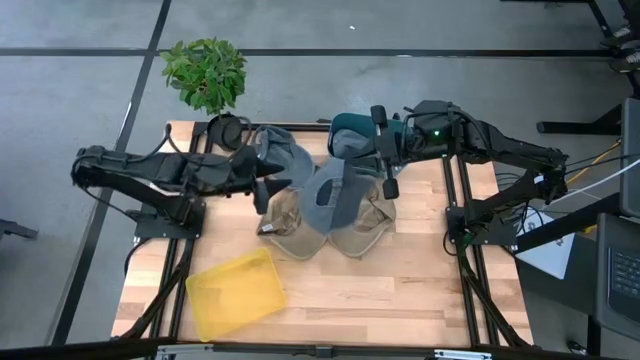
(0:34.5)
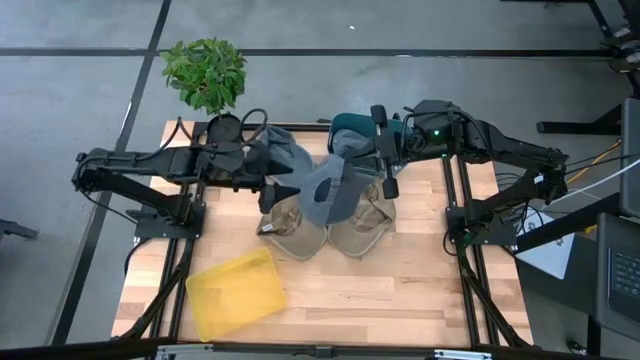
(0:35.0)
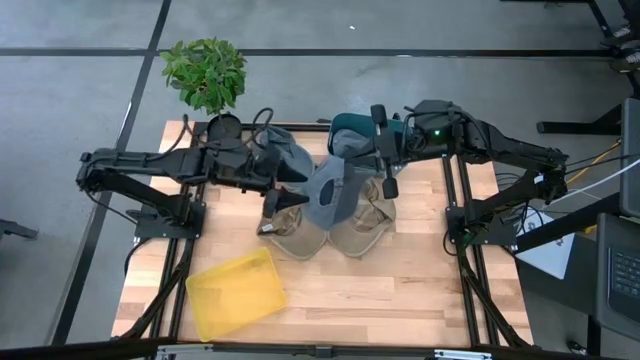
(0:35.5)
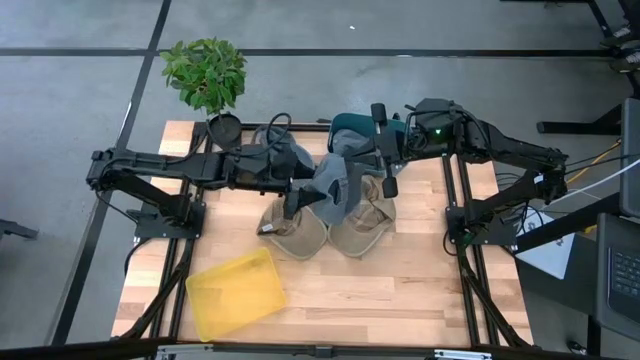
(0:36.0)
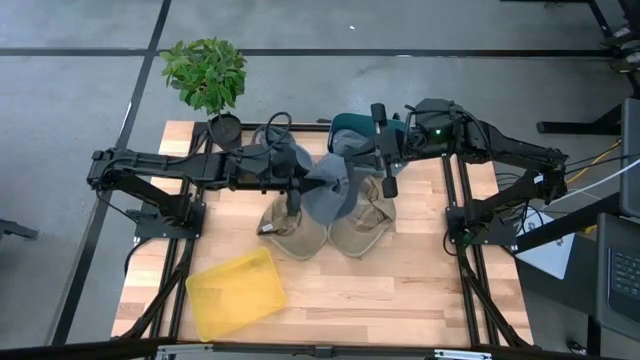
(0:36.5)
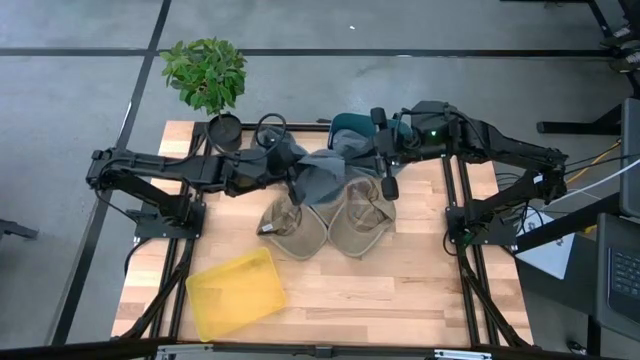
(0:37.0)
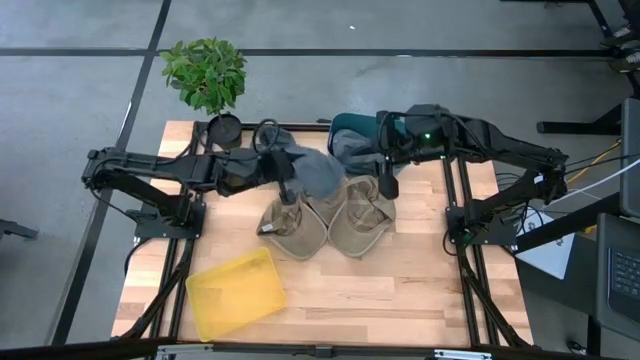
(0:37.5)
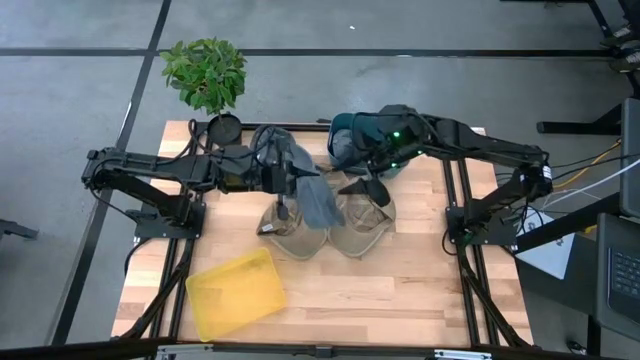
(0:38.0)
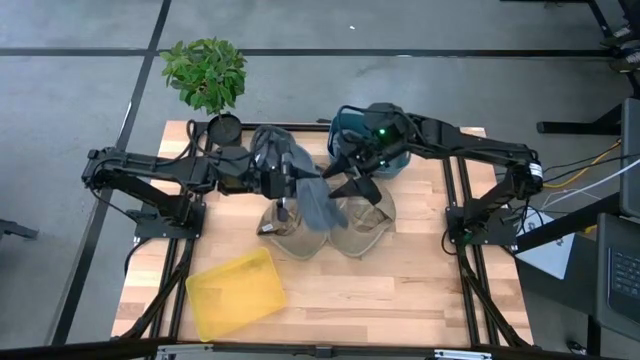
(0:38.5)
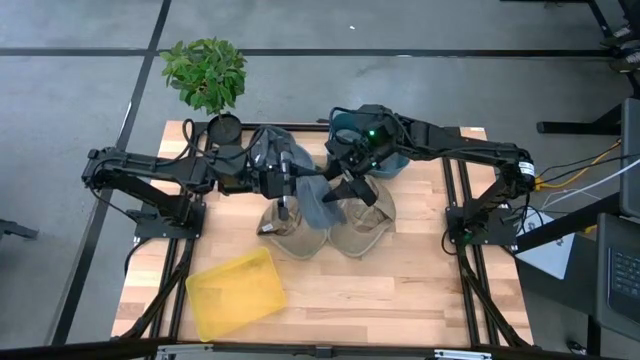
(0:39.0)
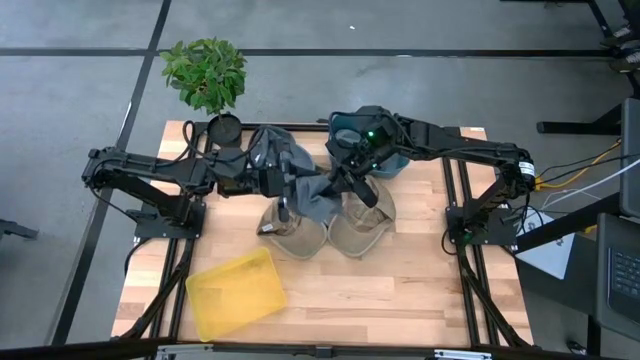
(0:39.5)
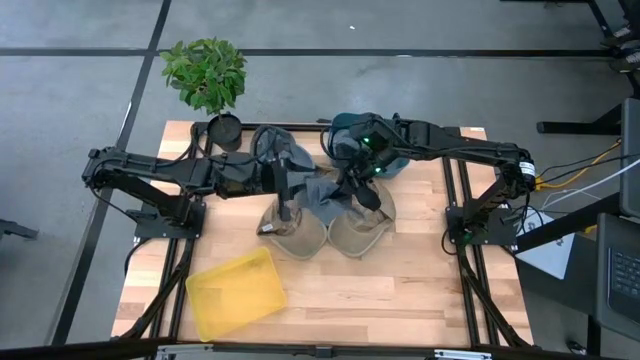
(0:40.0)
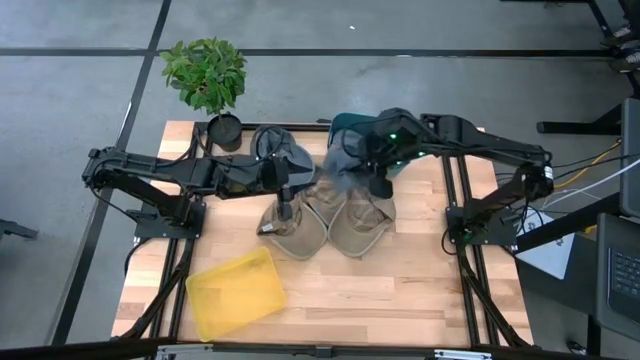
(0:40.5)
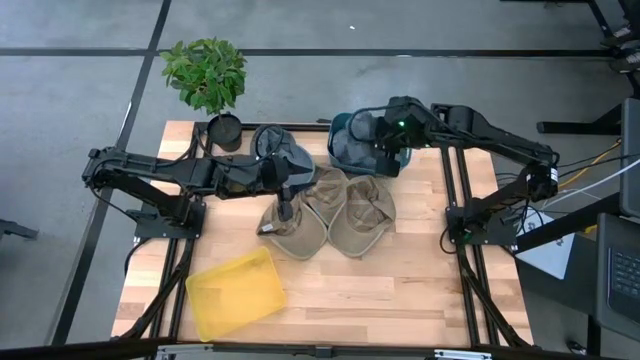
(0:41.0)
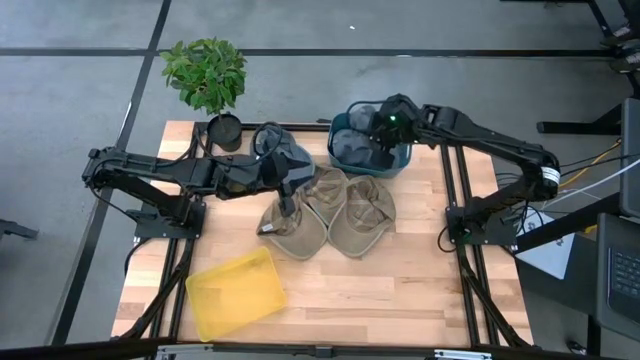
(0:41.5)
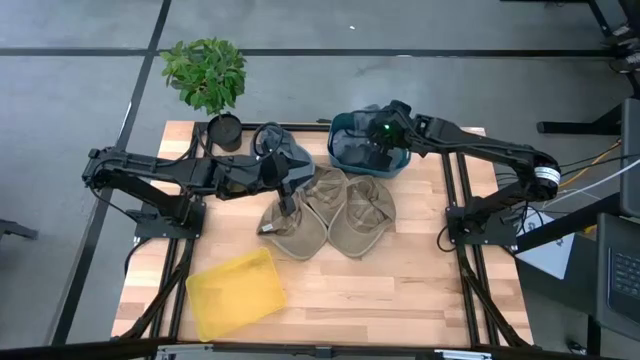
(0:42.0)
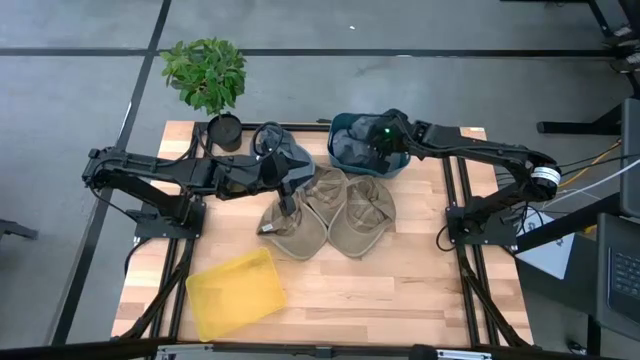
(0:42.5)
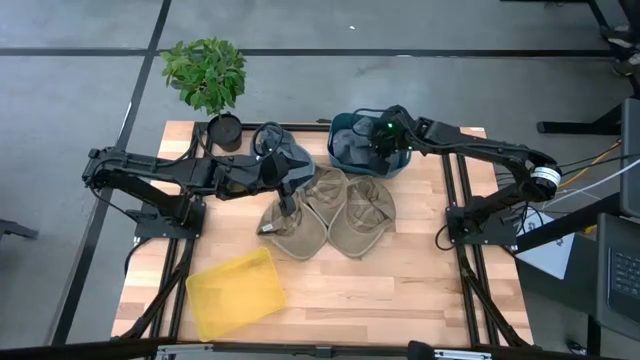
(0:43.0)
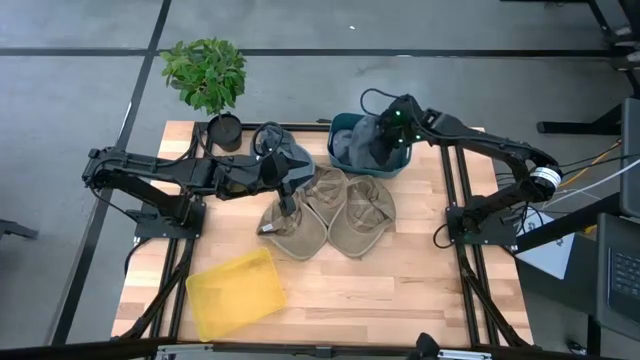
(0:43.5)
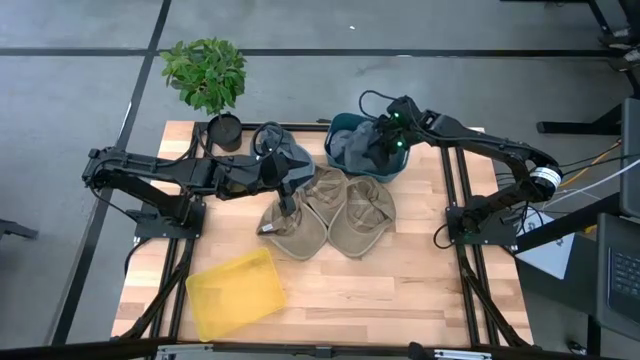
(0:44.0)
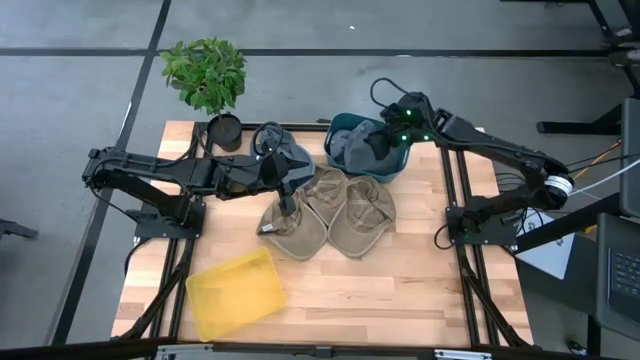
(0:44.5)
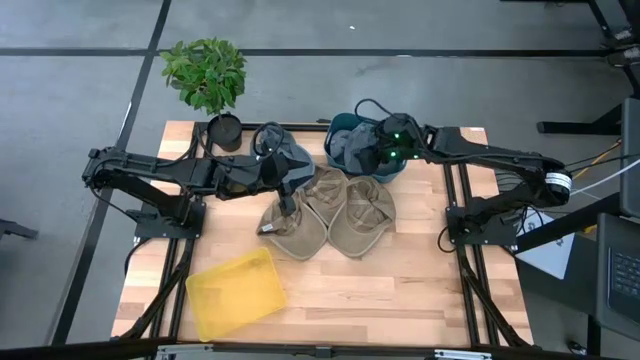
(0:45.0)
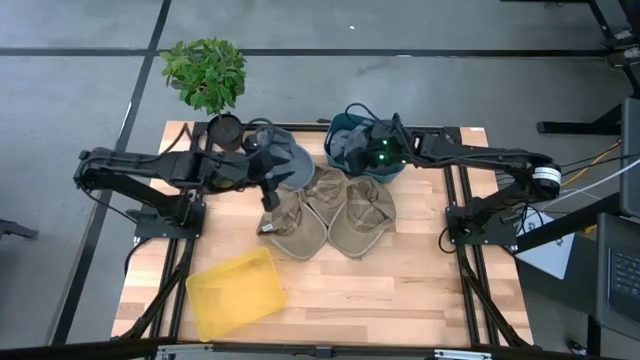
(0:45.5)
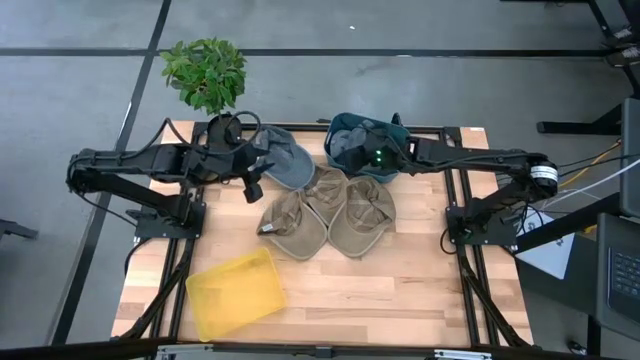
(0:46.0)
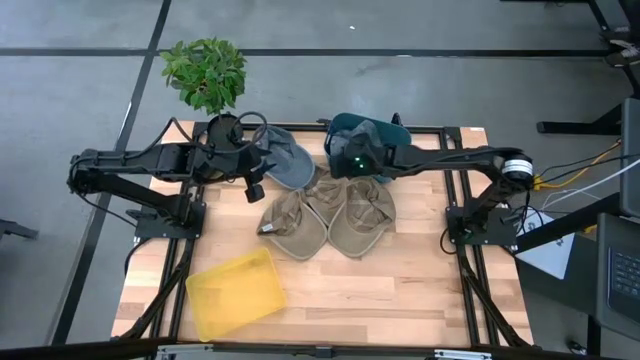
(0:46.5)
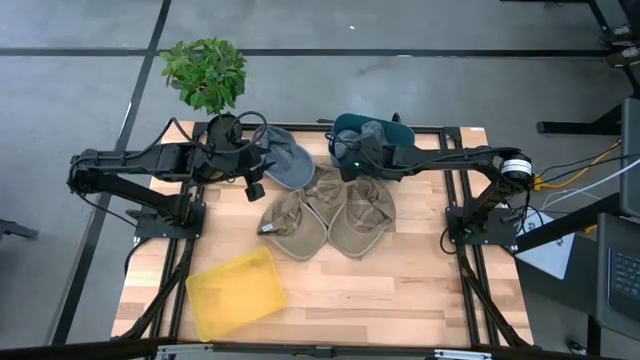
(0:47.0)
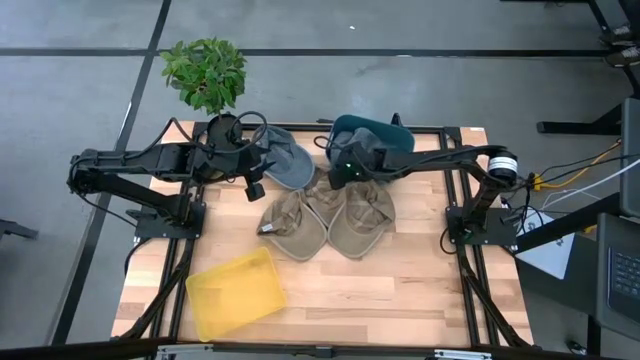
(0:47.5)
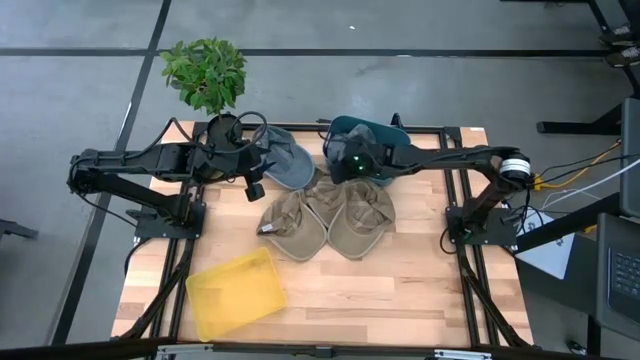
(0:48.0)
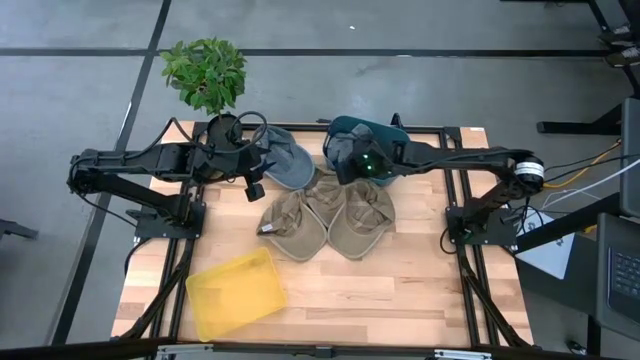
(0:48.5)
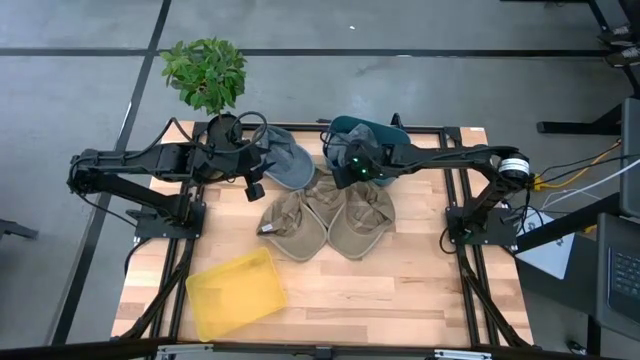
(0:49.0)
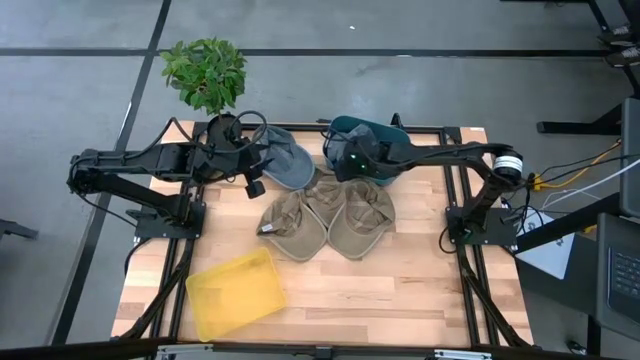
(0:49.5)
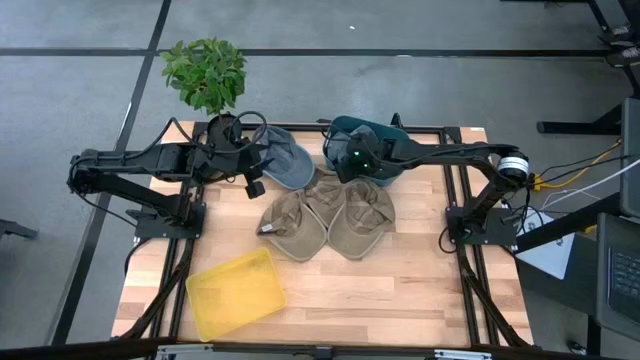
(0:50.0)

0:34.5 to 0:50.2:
Task: Pick & Place hat
Put the bottom gray cap into the blue bin

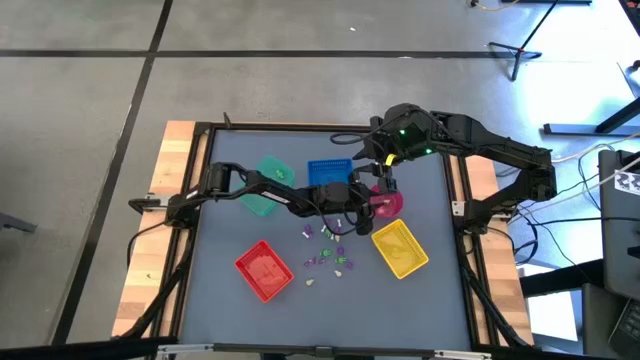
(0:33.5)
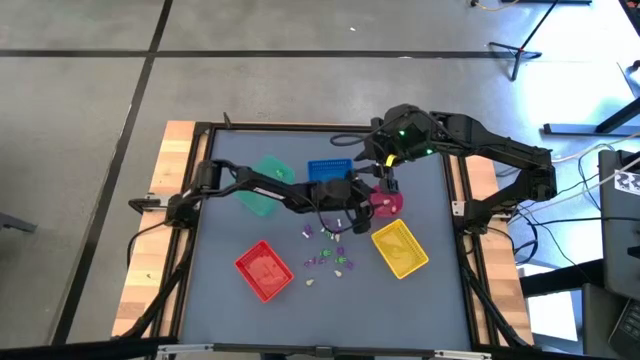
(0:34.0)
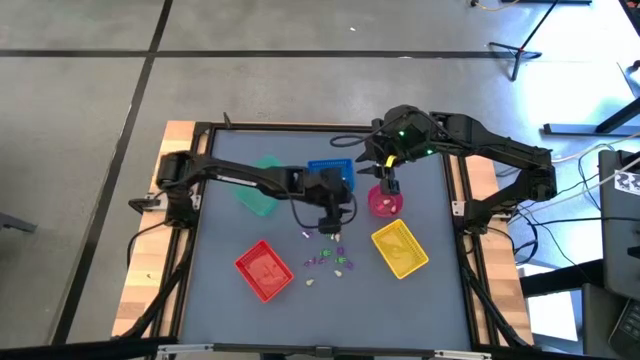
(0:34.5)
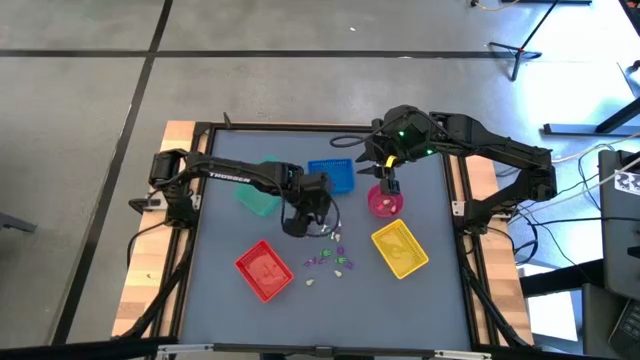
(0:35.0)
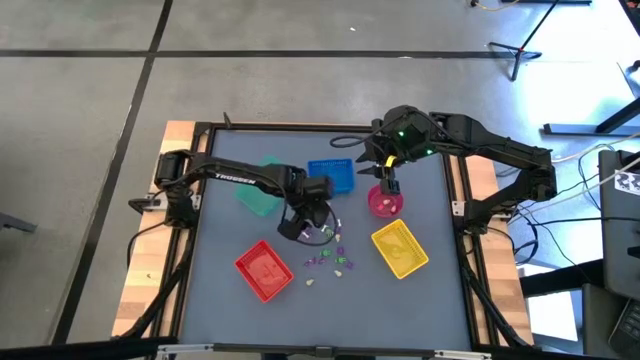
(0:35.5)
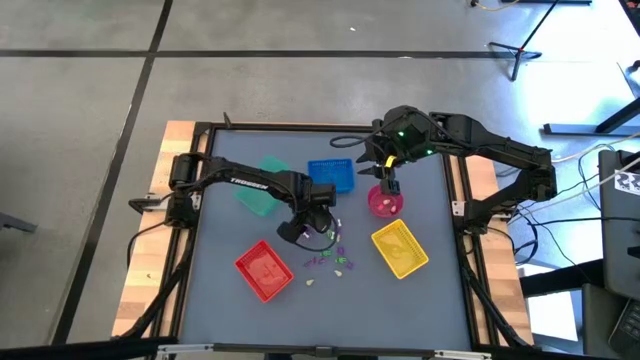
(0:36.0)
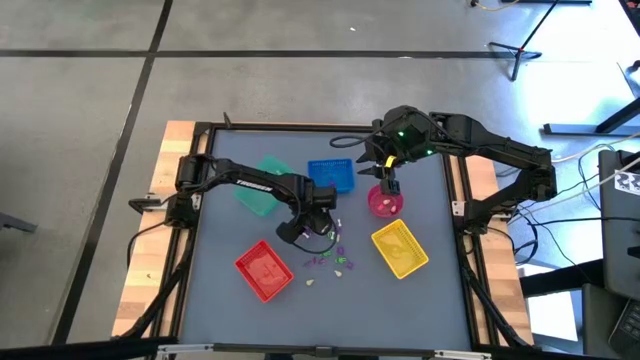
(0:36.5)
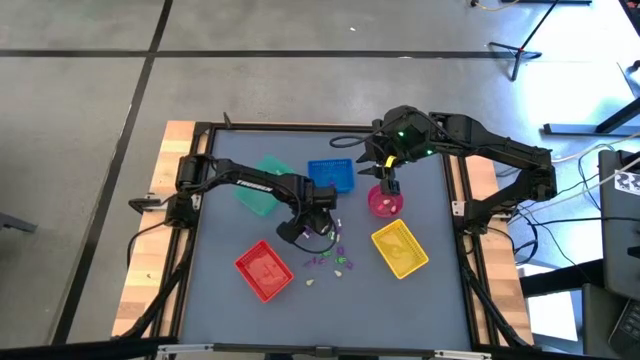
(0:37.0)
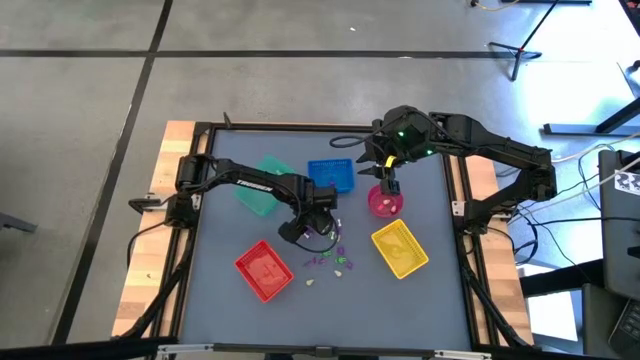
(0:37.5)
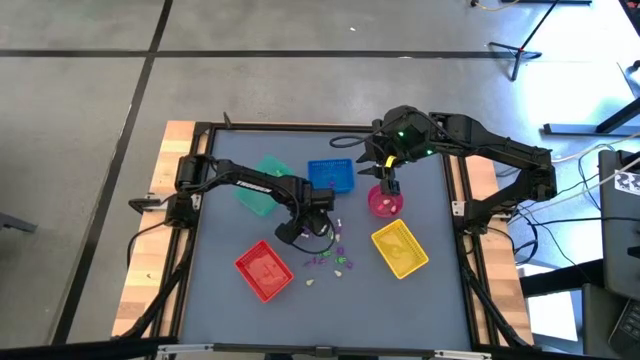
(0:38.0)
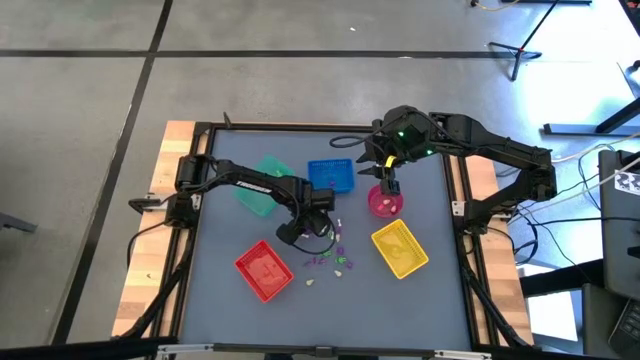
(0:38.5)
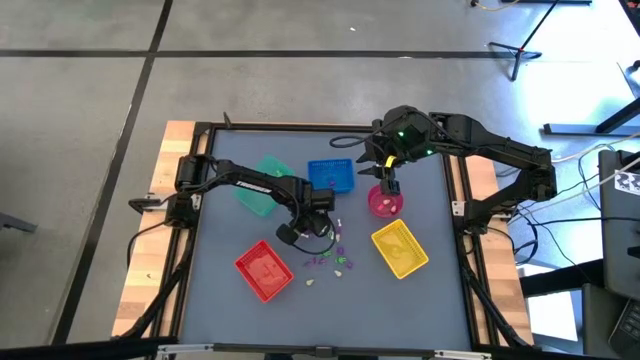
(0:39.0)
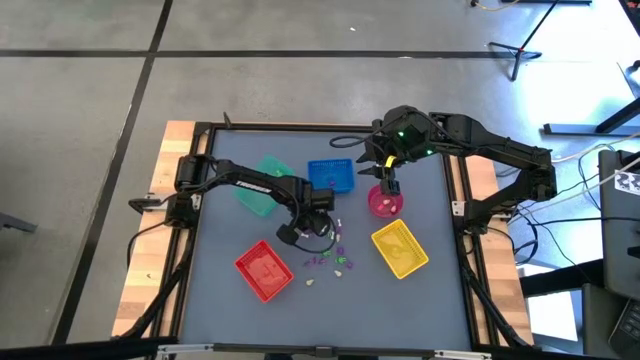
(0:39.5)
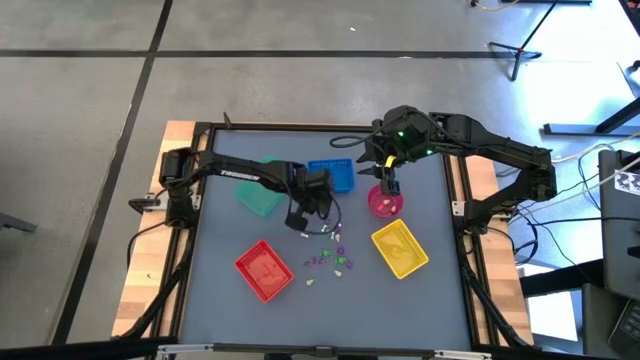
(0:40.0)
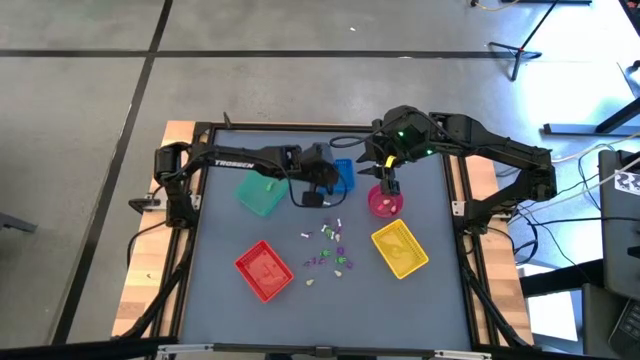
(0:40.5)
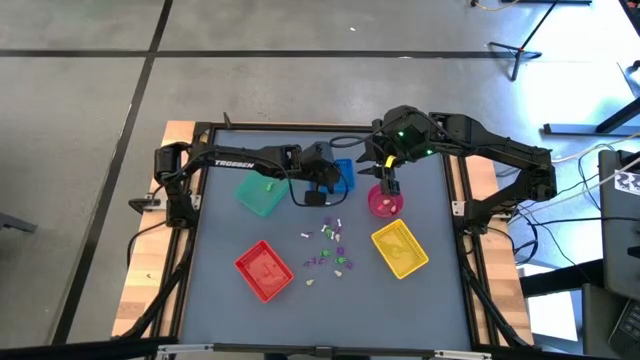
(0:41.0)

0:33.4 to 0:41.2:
Task: Sort Halloween decoration
Put the purple spider toy into the blue bin
